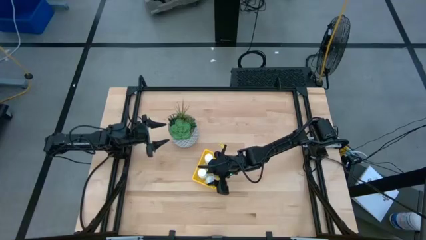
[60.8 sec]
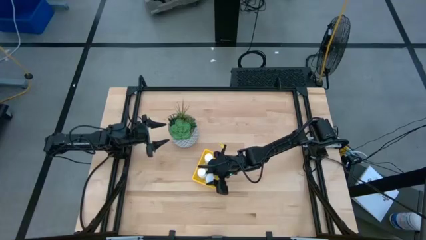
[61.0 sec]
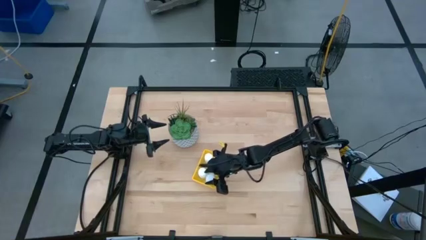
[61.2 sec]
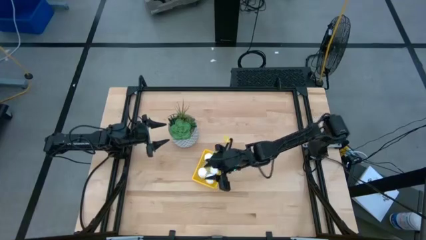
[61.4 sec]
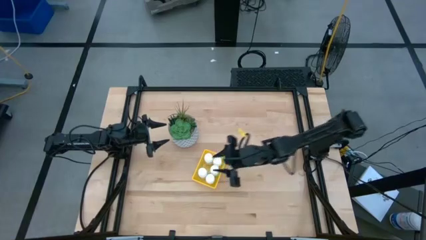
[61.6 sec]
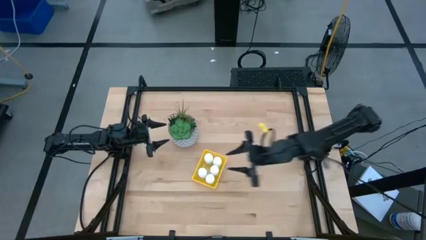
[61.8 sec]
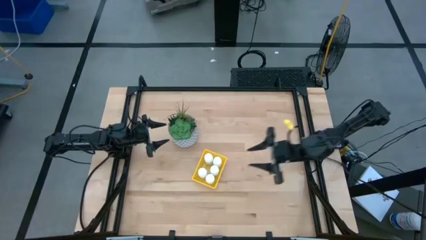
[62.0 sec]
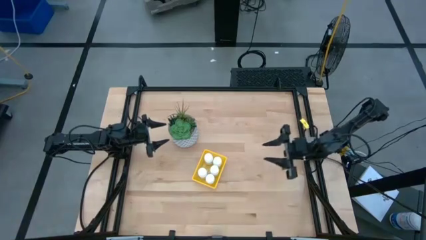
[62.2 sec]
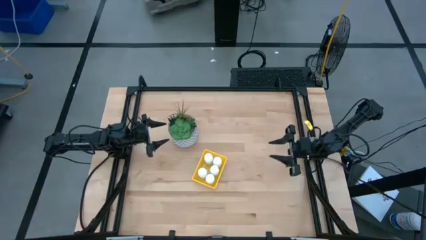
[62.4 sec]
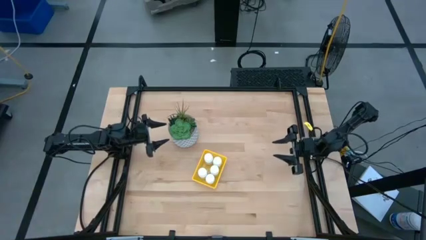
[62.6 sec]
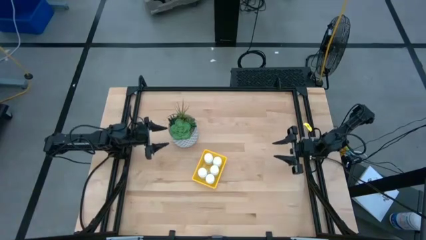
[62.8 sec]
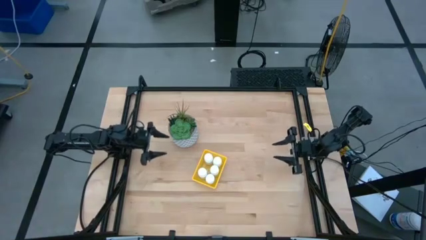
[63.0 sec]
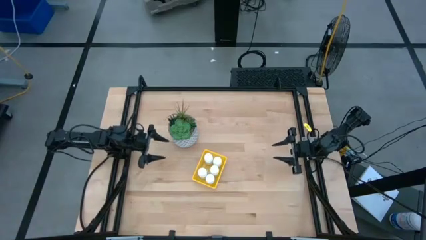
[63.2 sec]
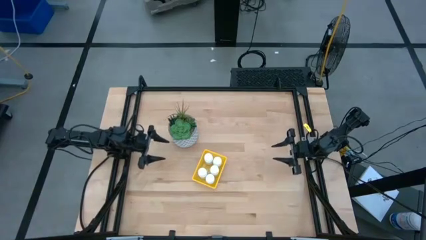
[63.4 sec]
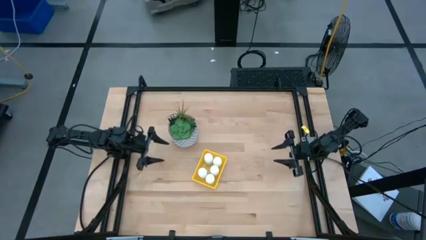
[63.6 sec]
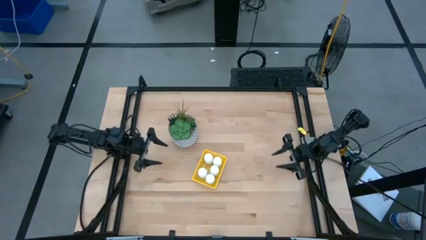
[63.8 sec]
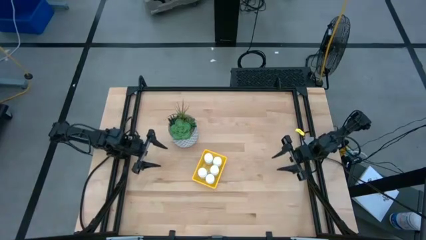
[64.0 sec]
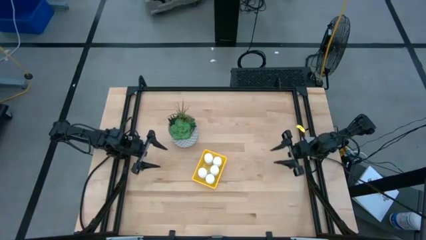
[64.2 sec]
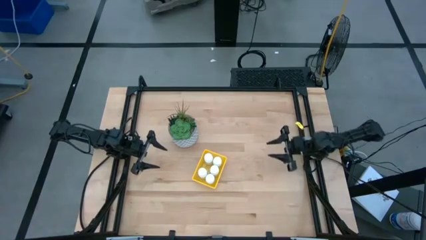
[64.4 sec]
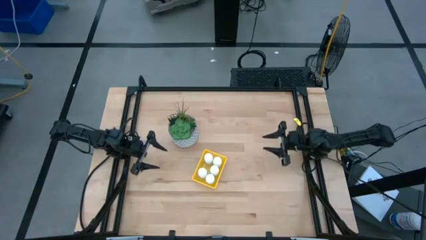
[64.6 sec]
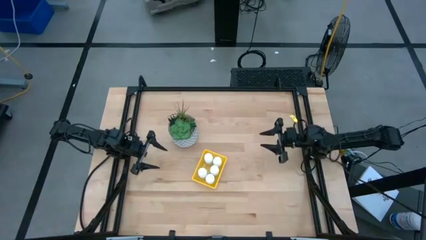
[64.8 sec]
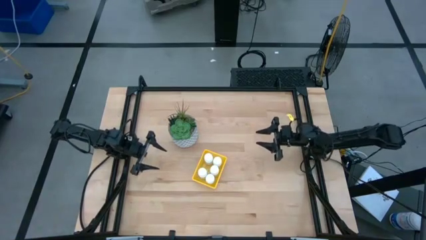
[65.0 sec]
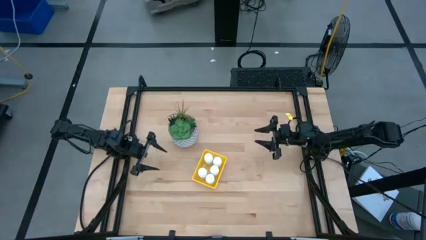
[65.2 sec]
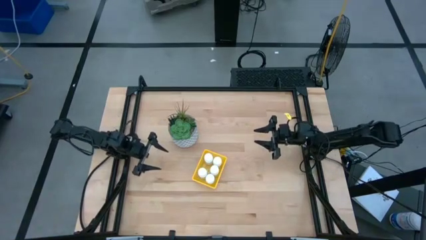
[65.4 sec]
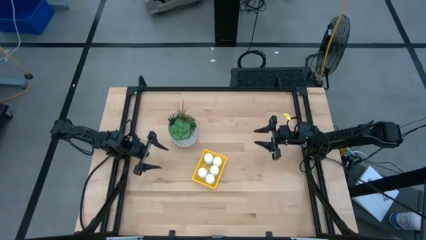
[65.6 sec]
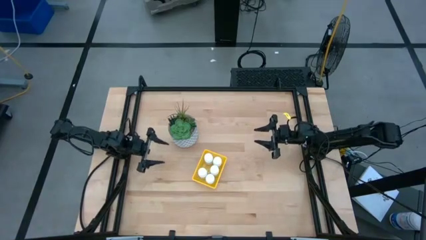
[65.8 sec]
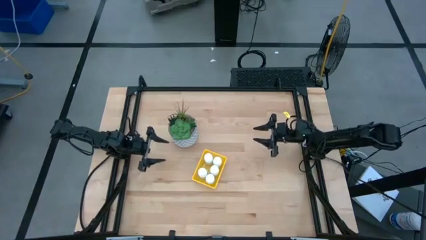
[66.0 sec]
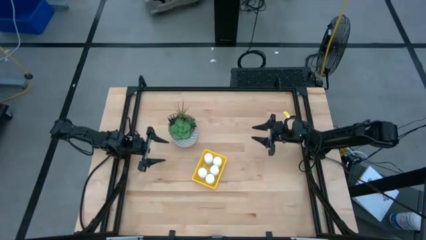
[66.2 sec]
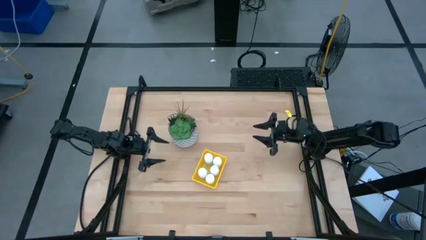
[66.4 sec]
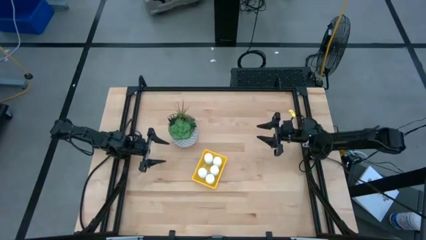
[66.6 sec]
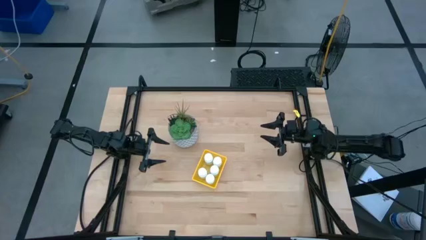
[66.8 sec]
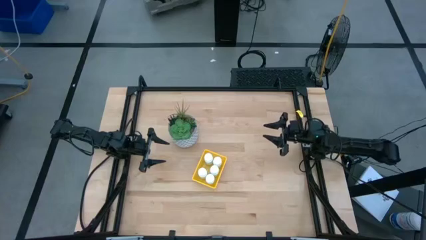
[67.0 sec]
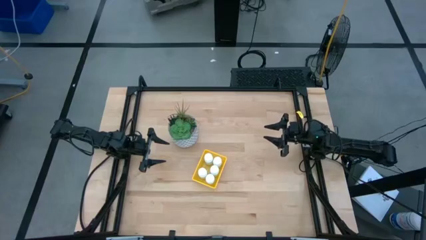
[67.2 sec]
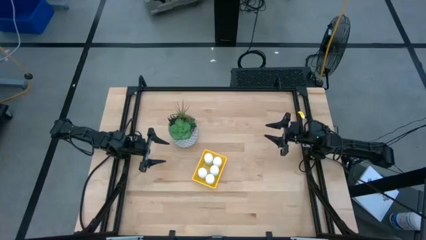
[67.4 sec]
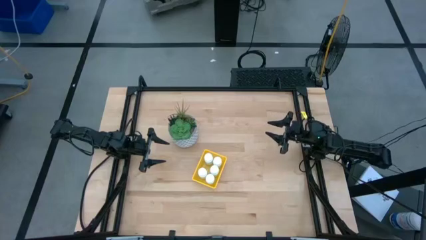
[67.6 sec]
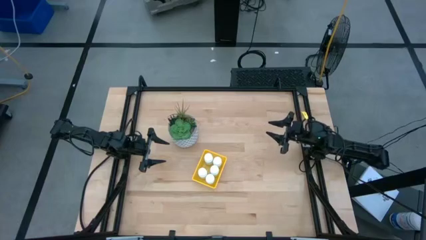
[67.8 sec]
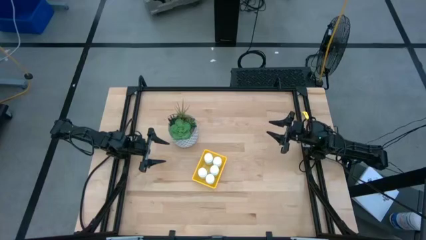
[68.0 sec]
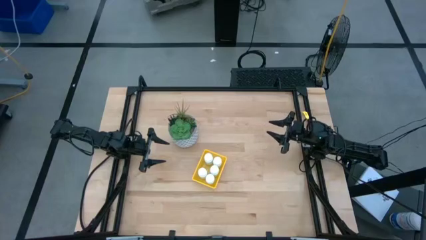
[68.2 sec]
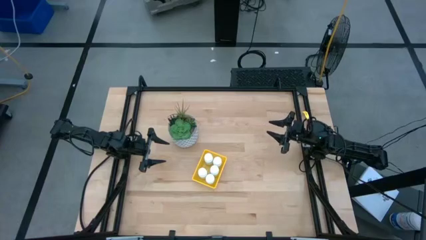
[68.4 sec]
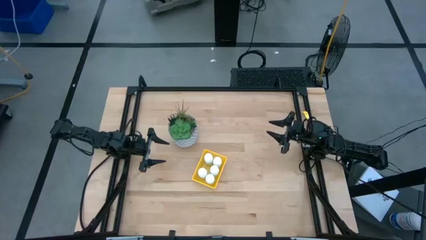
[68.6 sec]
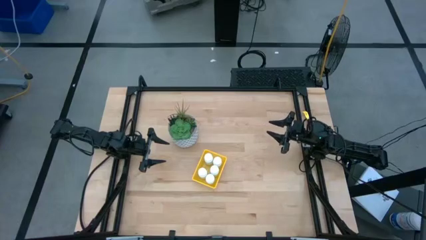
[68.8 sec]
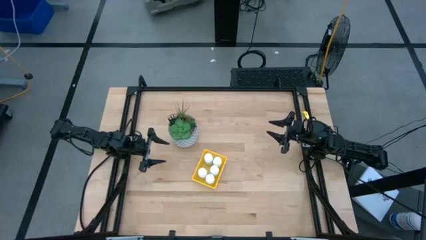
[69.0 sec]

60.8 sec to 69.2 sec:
Task: Pick and place pill bottles into a basket
Return to Home Position

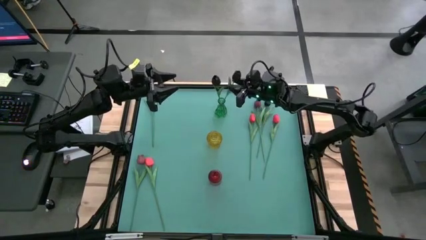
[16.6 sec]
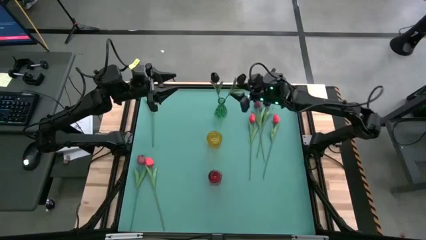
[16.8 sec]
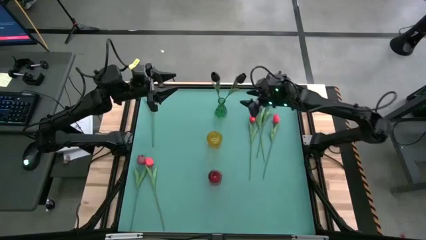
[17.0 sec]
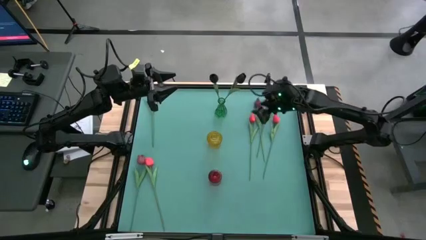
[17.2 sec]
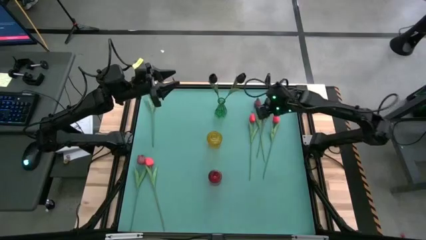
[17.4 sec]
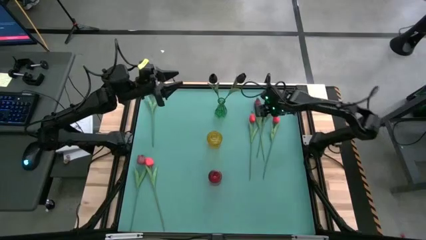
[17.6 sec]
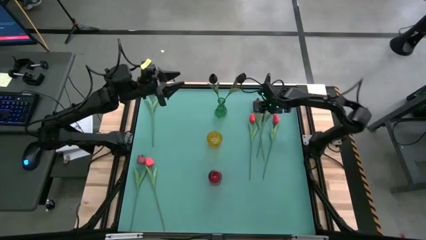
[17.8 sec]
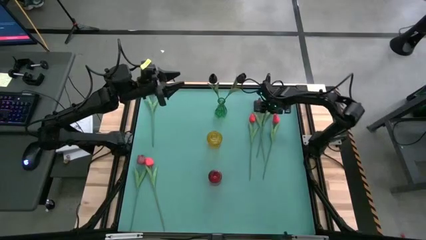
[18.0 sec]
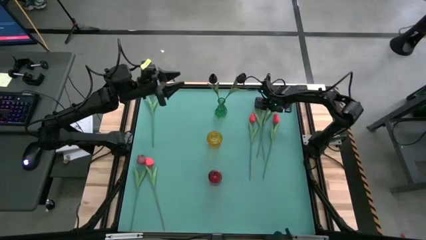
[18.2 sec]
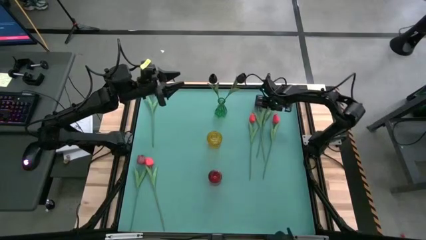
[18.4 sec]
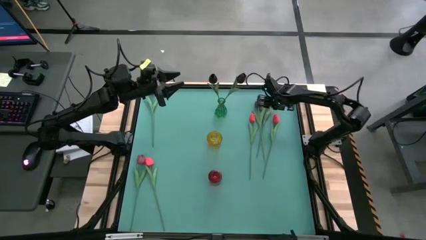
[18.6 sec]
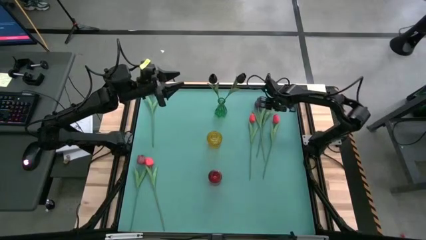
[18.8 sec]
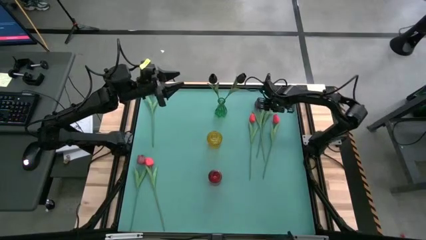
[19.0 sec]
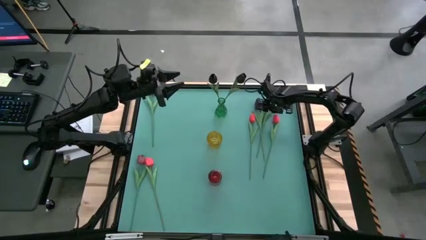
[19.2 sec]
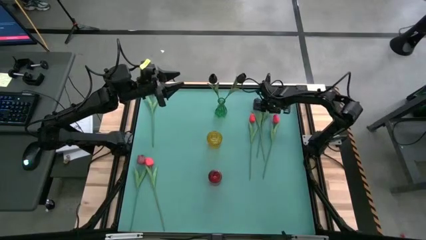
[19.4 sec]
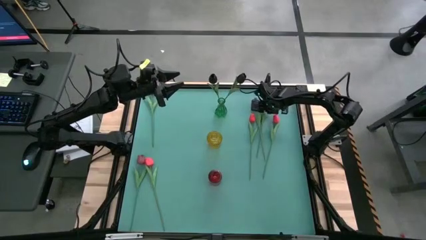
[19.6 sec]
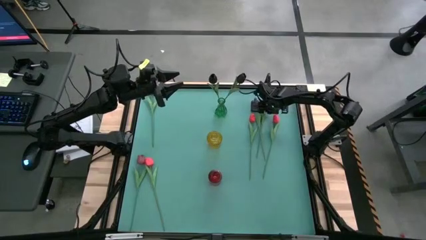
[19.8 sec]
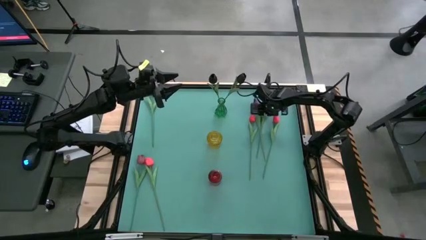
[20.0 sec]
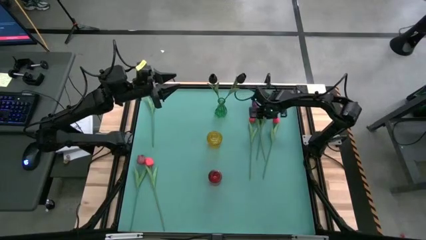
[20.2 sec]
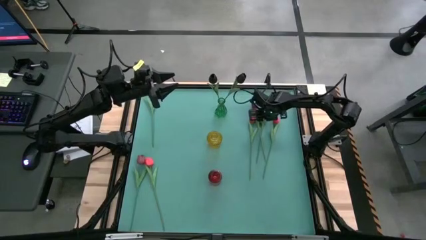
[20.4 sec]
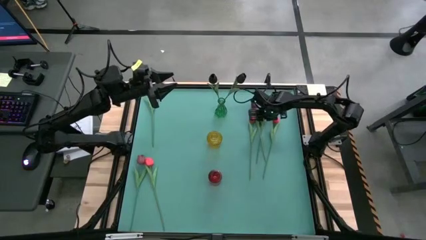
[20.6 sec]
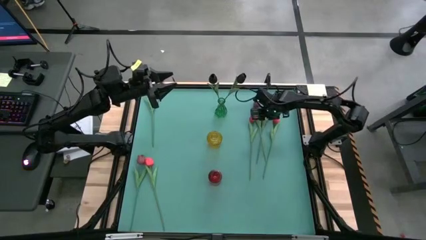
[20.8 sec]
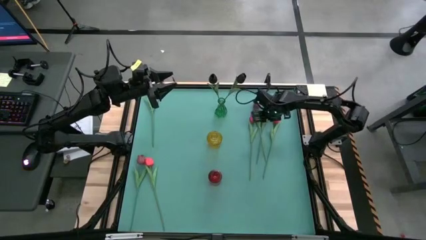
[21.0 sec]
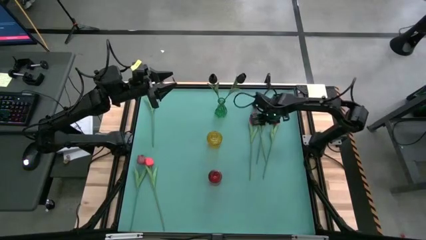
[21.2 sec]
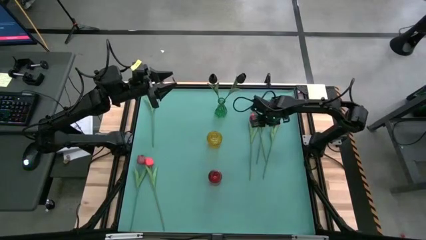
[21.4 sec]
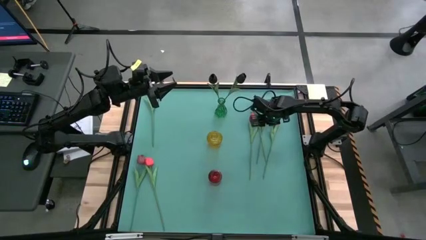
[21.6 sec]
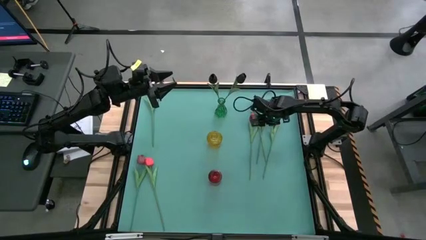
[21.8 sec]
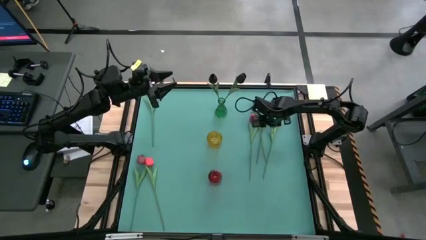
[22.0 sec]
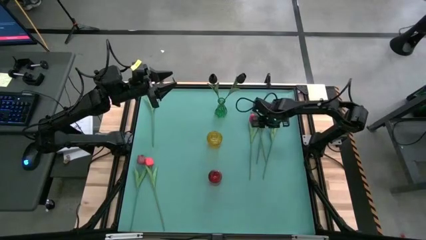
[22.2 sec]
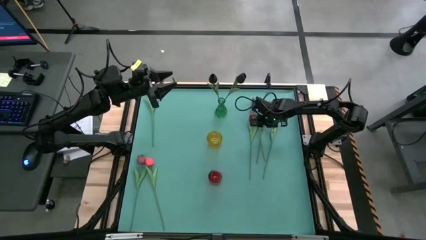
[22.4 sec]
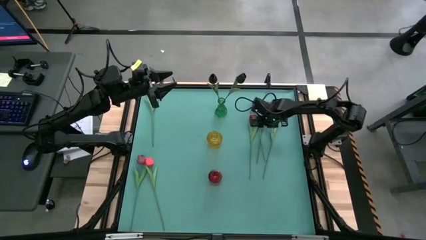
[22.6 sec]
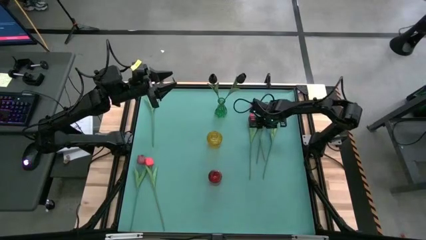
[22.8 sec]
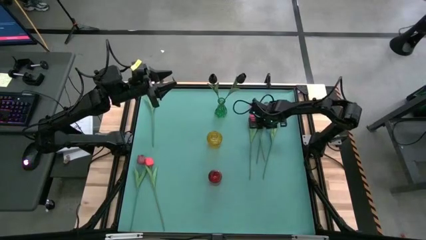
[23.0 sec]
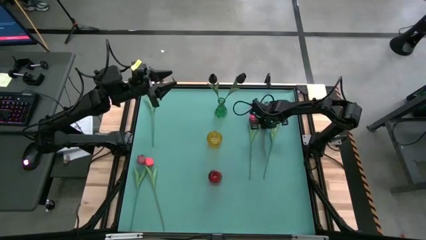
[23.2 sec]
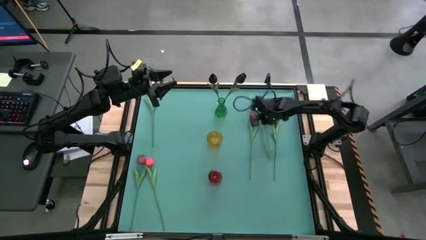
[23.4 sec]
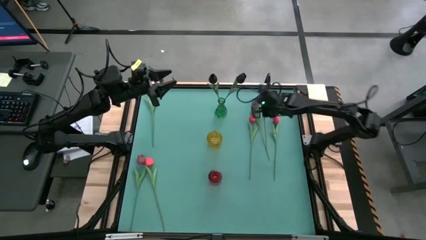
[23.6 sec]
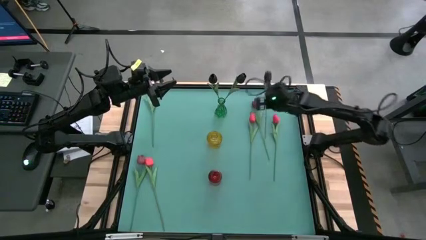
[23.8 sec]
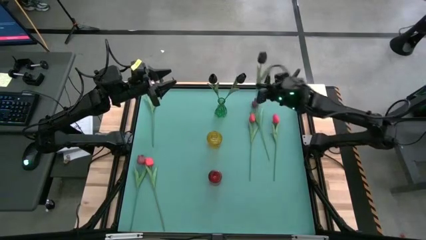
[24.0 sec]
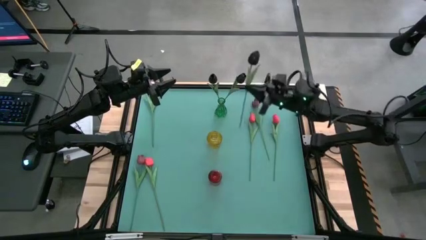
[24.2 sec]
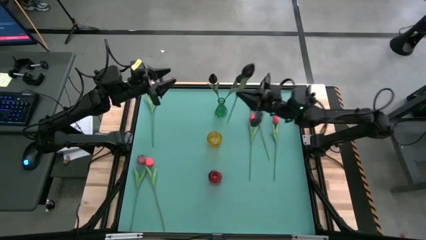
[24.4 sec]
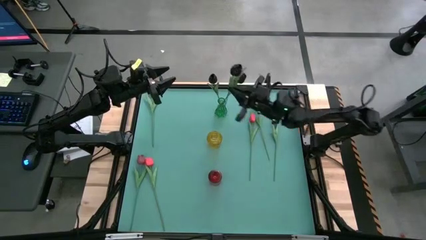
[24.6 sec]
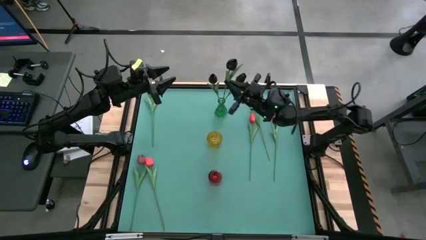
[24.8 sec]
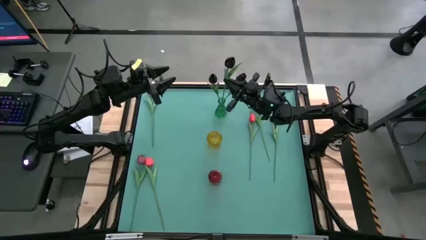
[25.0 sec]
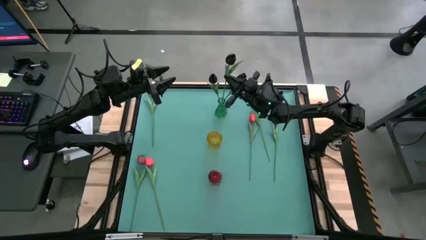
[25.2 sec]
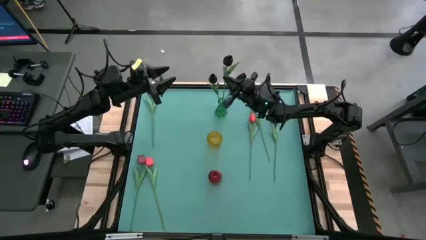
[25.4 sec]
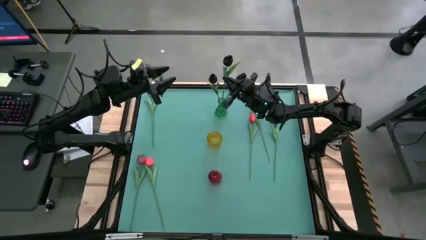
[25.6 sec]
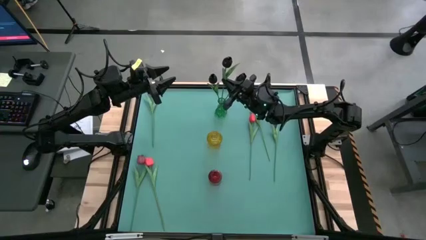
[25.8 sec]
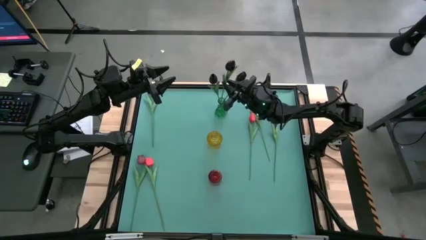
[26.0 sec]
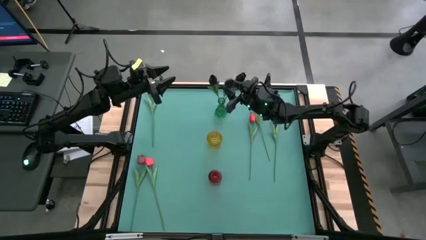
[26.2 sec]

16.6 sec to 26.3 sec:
Task: Sort flowers into vase by color
Put the black tulip into the green vase
